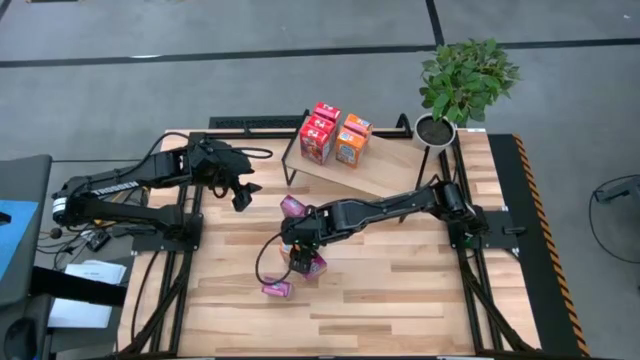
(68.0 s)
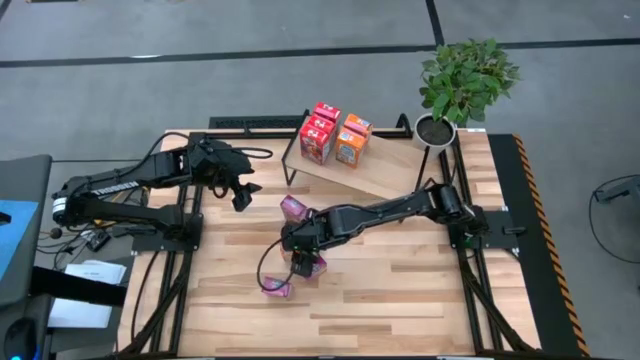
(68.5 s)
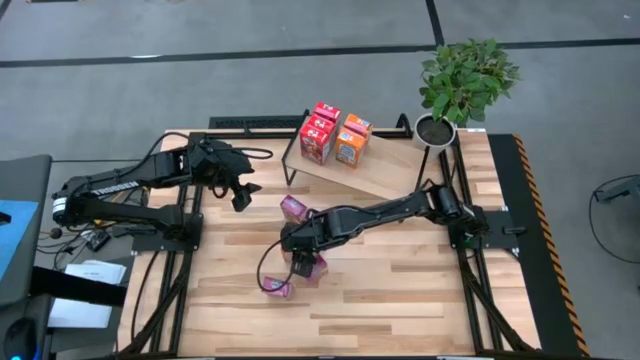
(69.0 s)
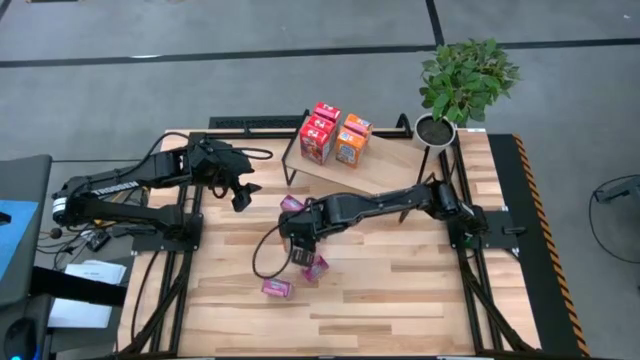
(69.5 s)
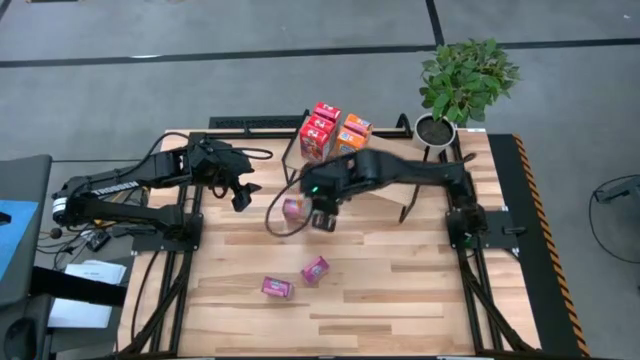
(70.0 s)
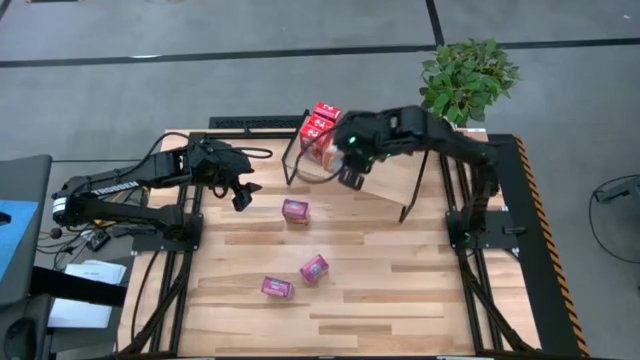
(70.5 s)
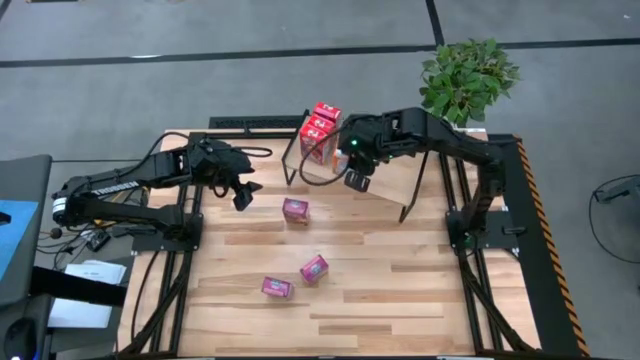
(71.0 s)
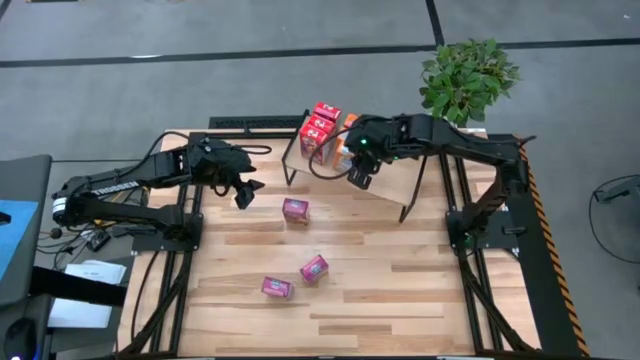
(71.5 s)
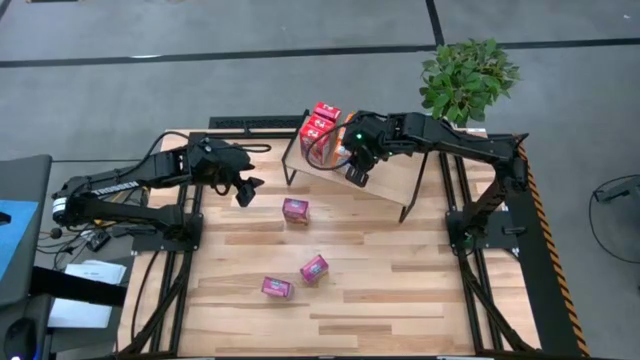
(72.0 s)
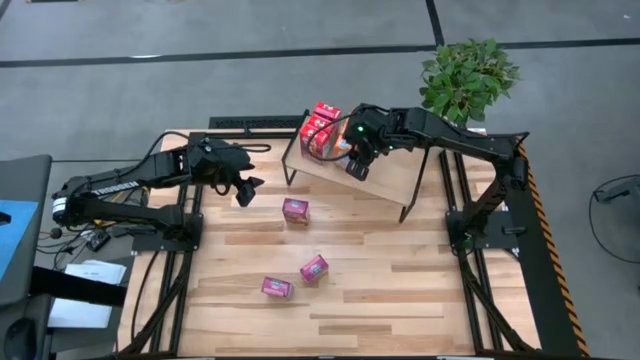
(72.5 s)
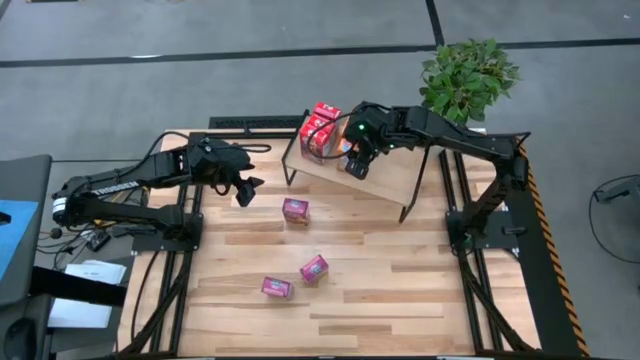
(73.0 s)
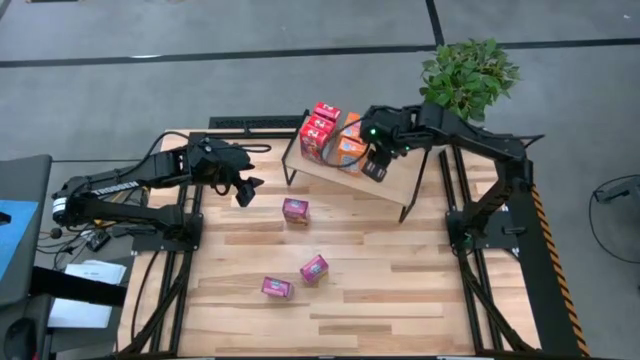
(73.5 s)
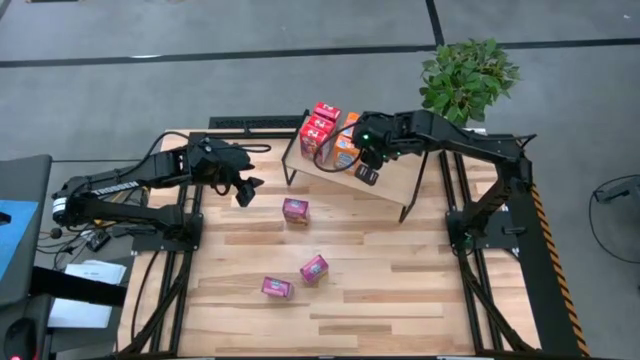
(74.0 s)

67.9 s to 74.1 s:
Task: Stack cereal on shelf
Put the orange cereal box on the shelf aligned with the other orange cereal boxes

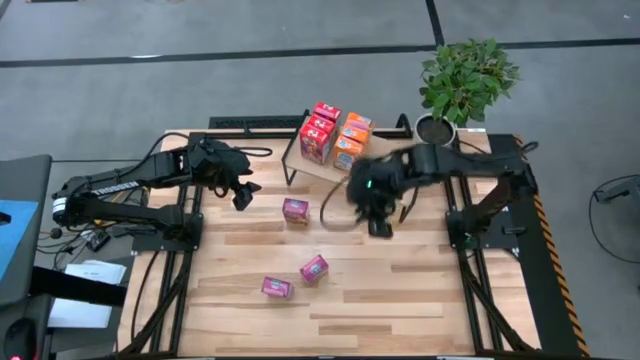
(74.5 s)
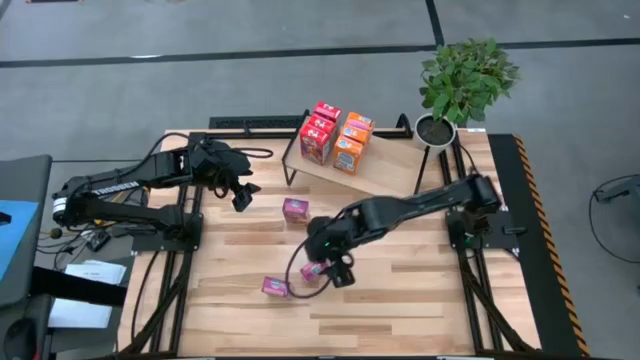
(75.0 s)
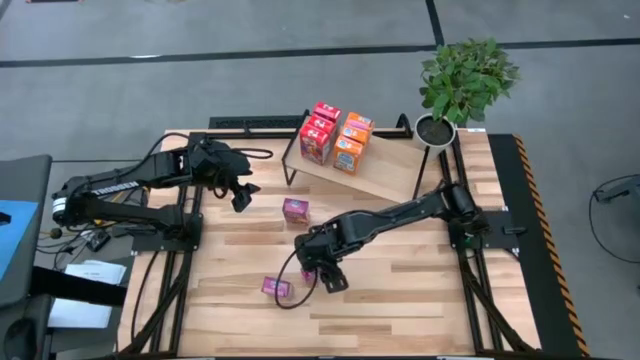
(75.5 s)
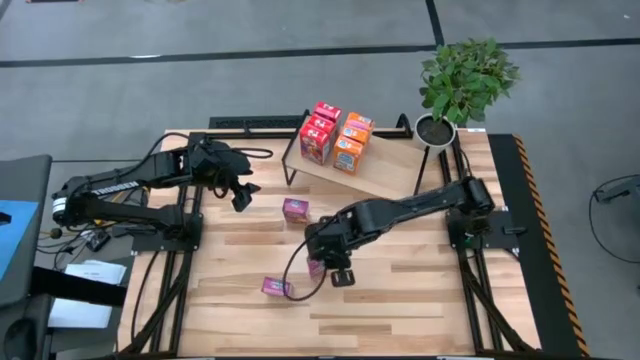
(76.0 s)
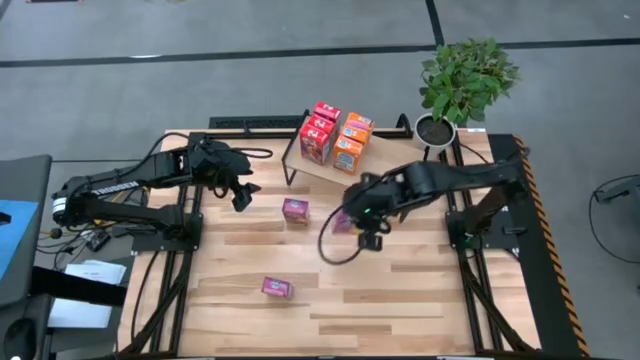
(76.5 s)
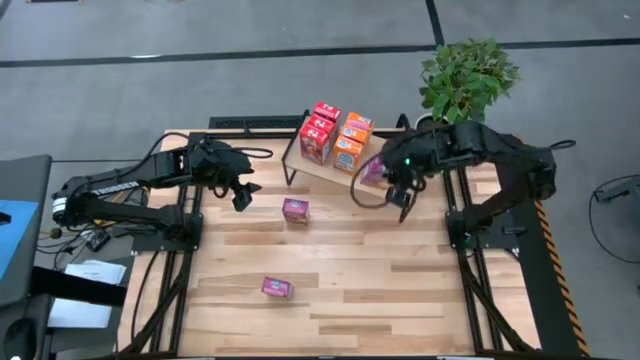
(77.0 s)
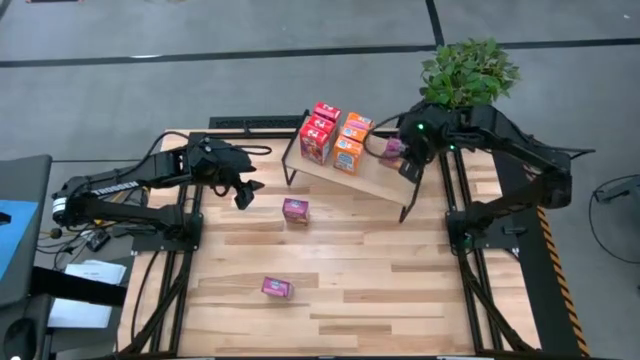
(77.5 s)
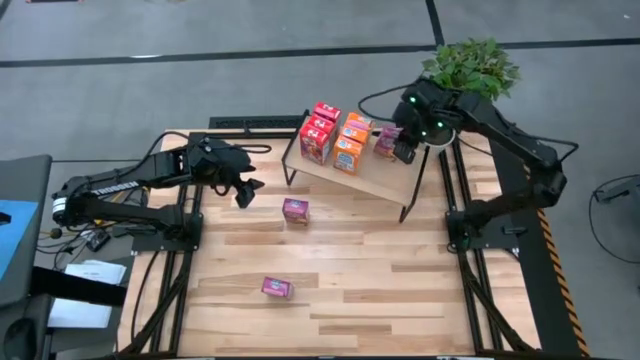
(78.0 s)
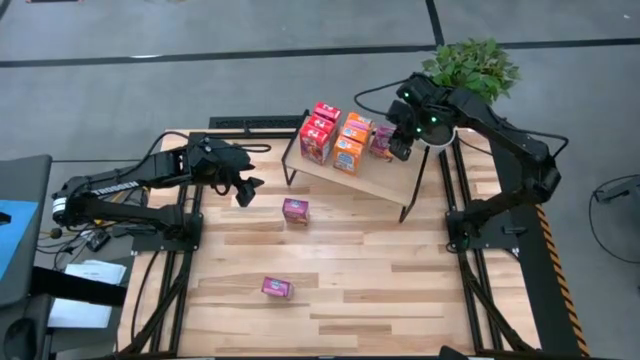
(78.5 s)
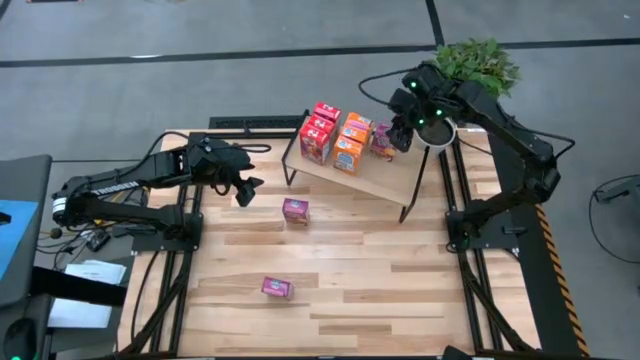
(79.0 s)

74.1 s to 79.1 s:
Put the bottom right purple cereal box on the shelf

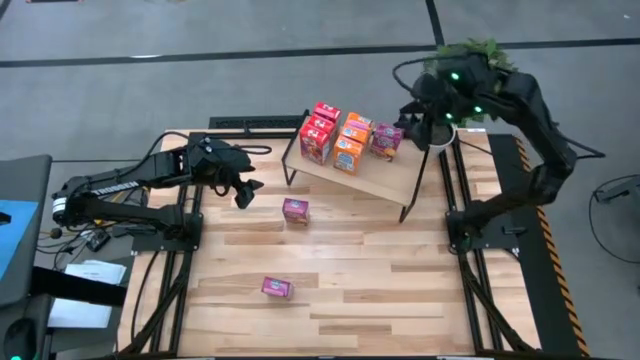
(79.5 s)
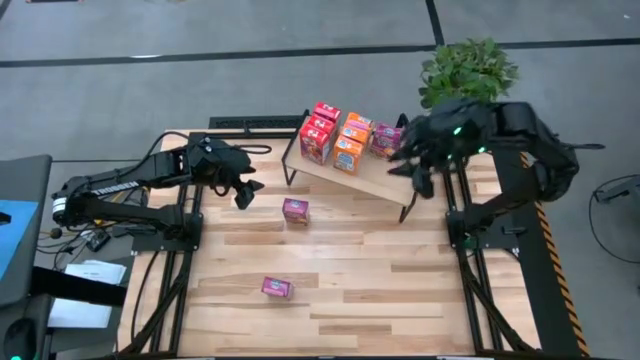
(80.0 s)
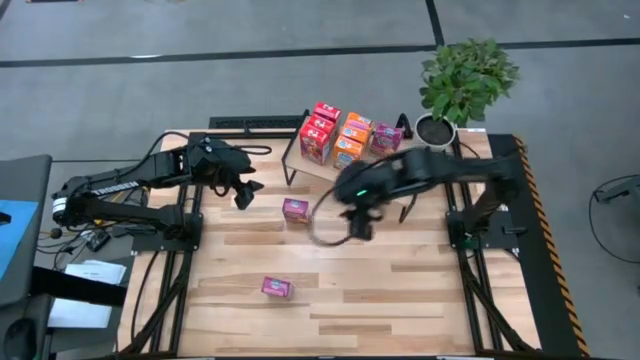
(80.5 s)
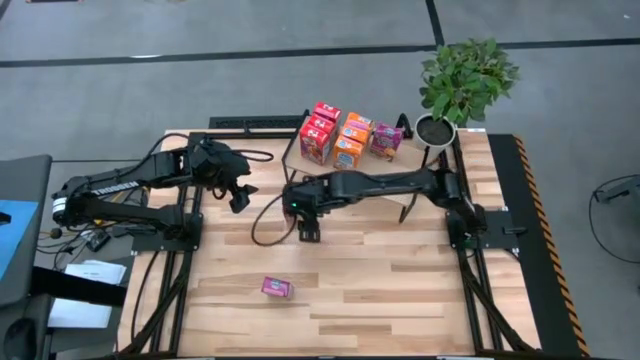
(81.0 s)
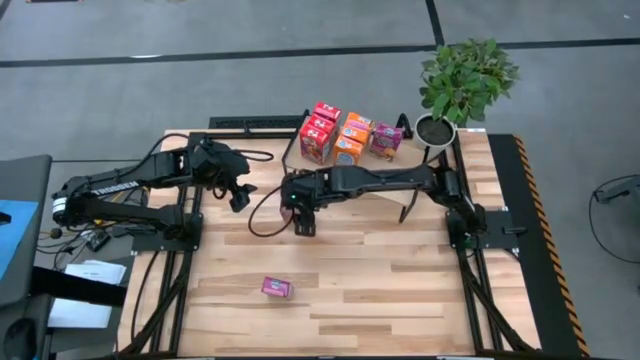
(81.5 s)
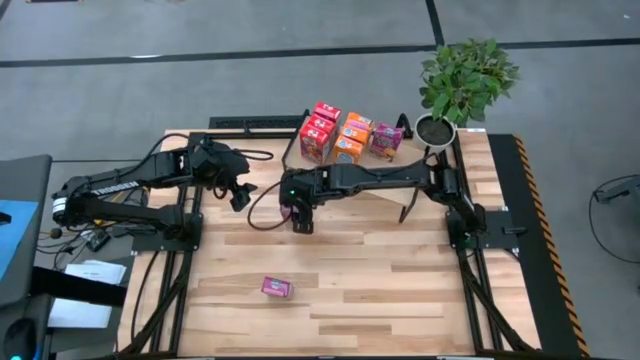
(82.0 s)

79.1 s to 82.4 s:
Put the top purple cereal box on the shelf aligned with the other purple cereal box

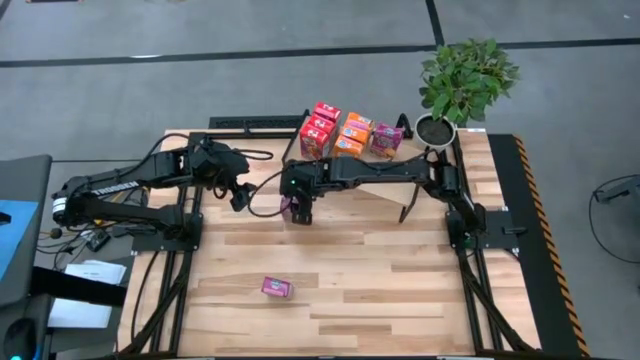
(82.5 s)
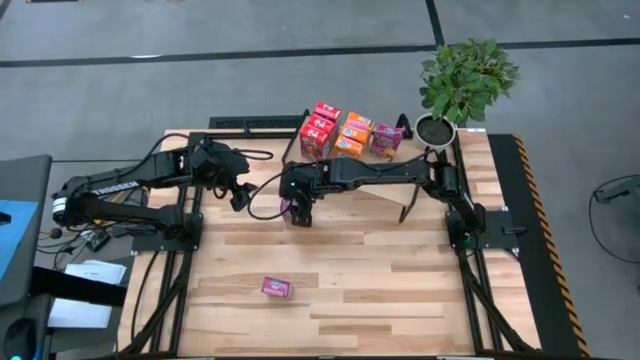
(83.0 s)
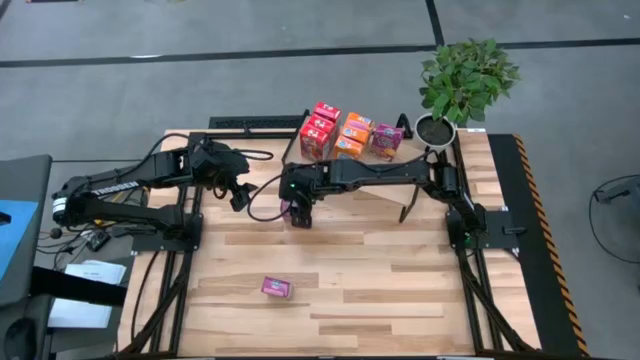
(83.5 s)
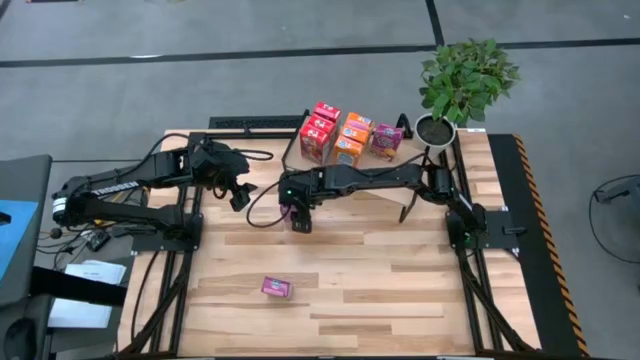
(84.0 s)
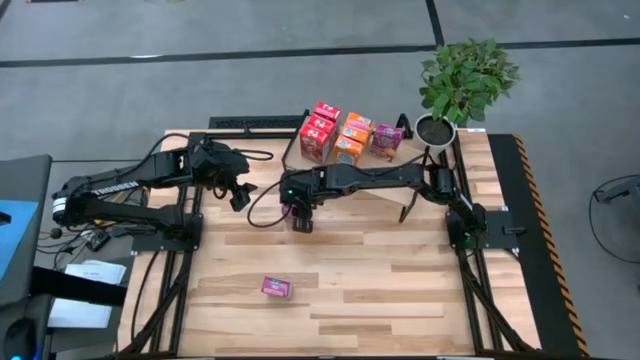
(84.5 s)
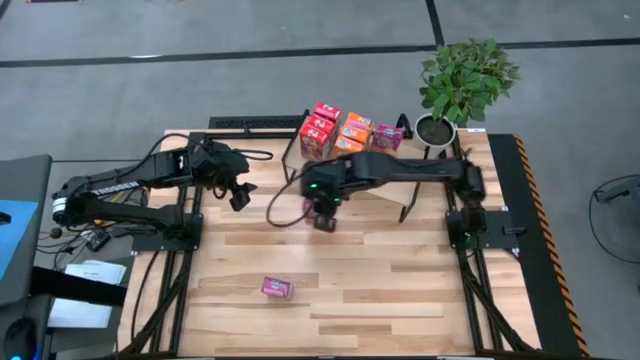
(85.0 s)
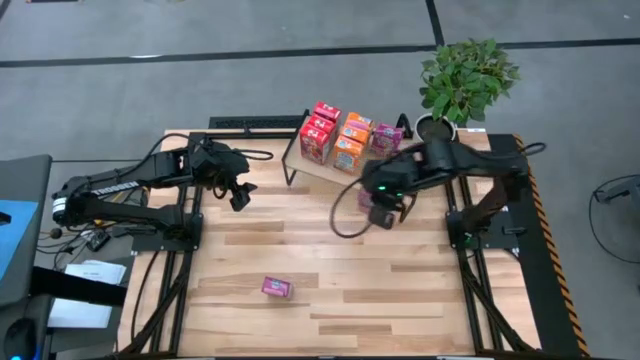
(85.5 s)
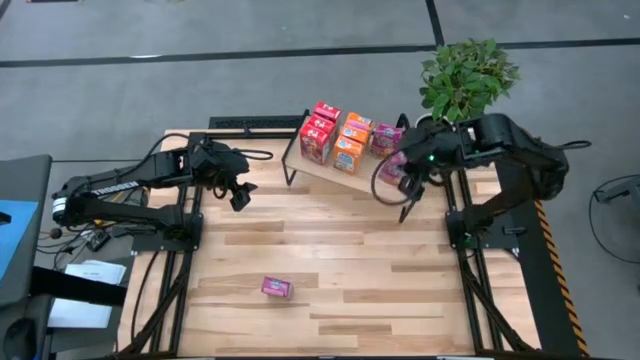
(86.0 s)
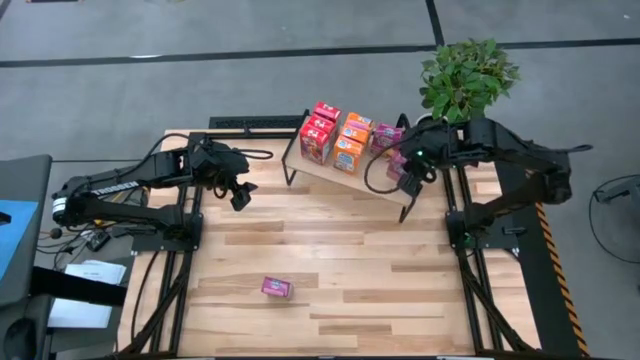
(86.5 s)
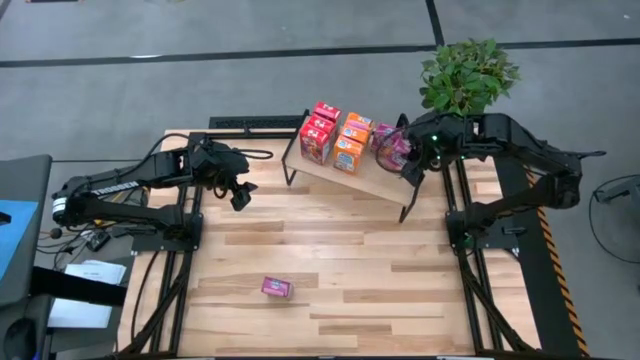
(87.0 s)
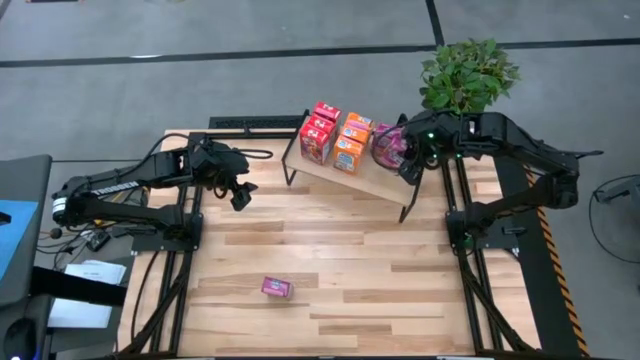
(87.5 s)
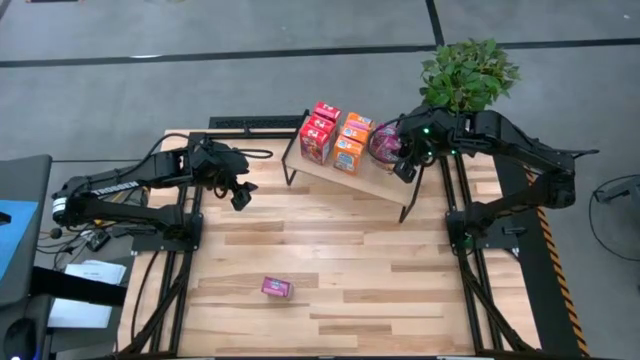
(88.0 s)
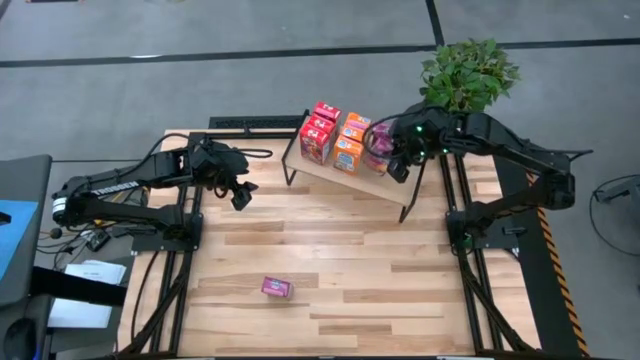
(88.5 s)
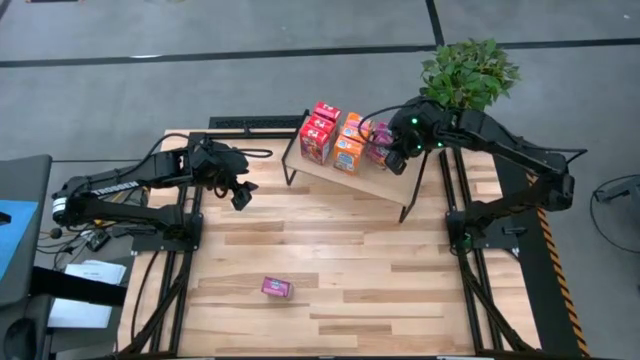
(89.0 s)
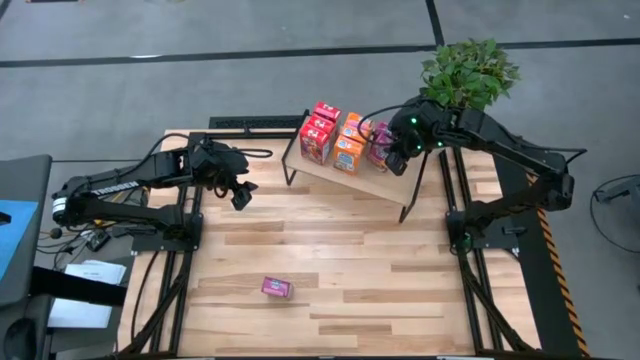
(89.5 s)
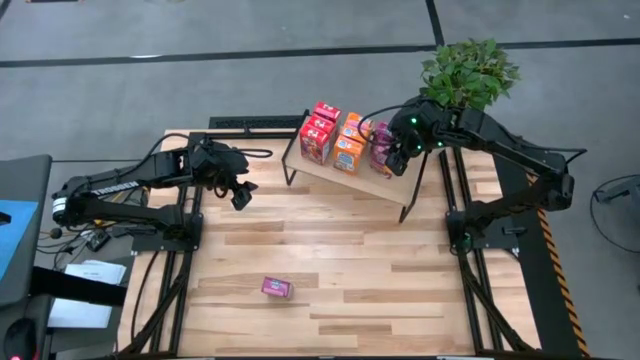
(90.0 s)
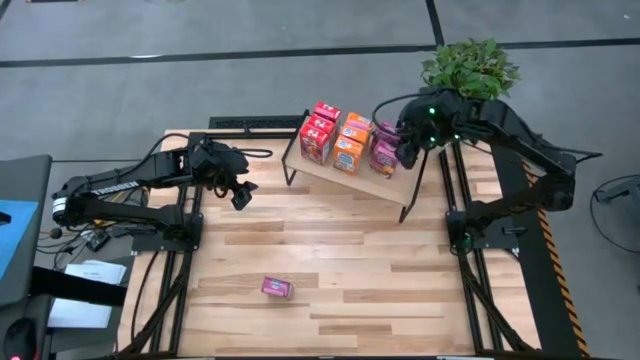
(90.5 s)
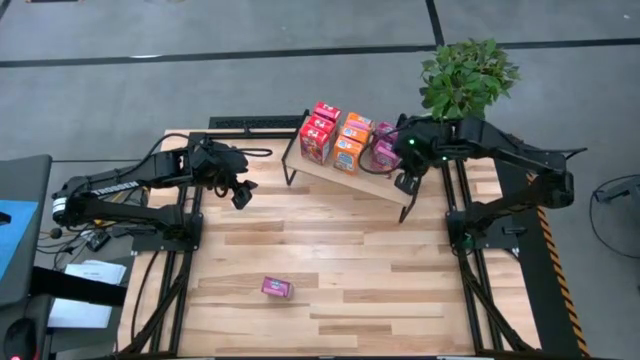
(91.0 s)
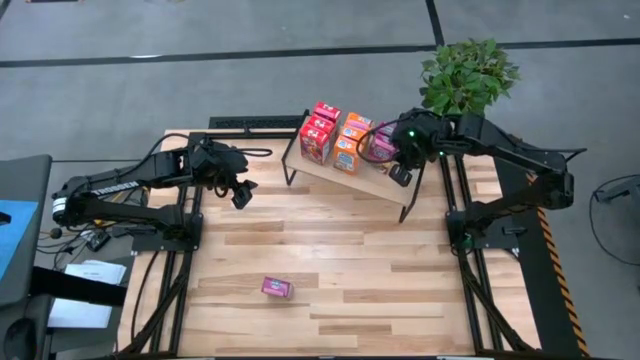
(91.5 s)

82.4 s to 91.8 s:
Put the top purple cereal box on the shelf aligned with the other purple cereal box
